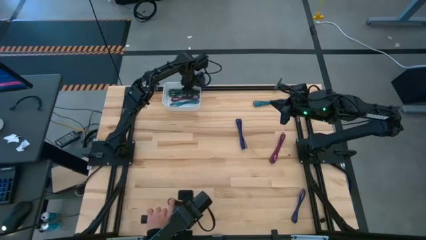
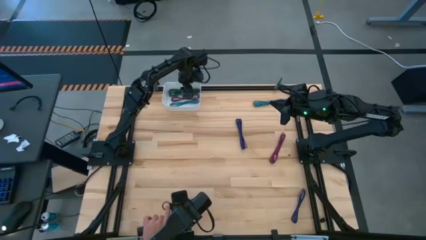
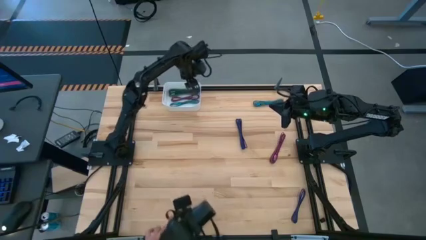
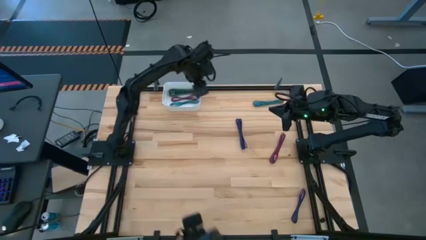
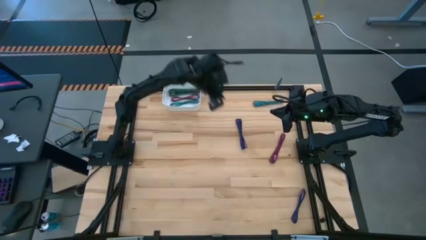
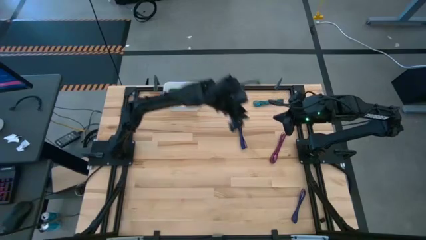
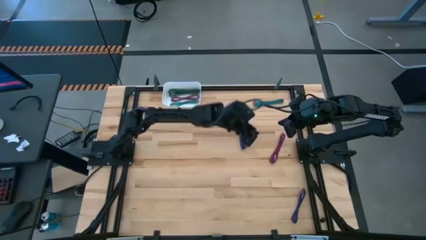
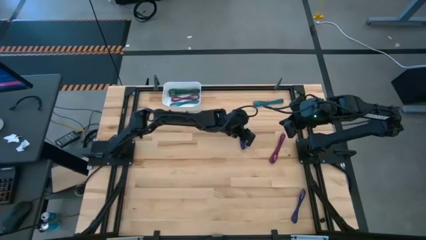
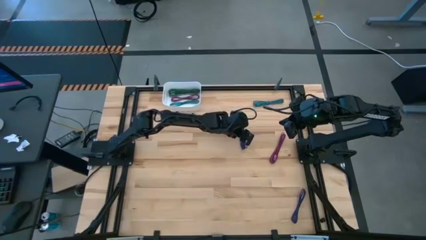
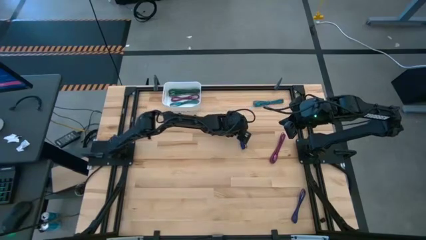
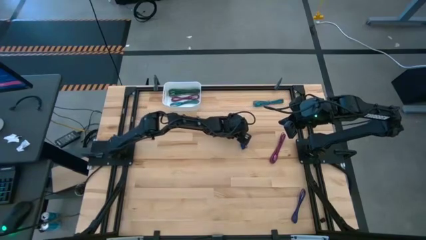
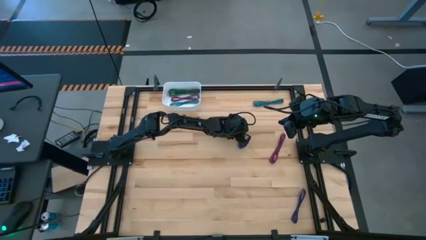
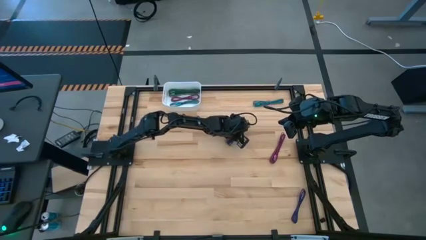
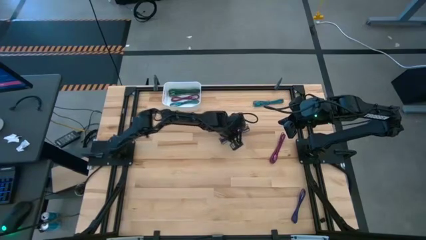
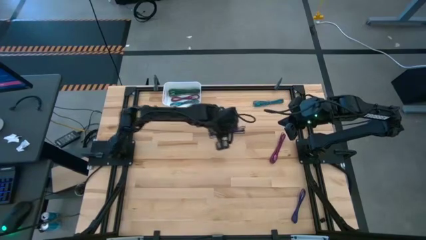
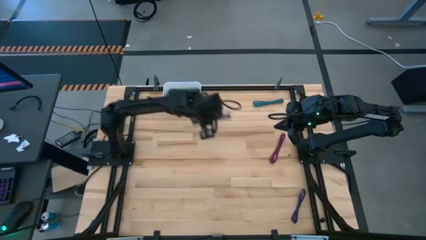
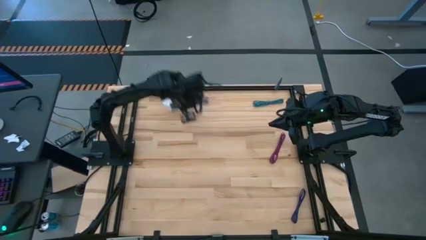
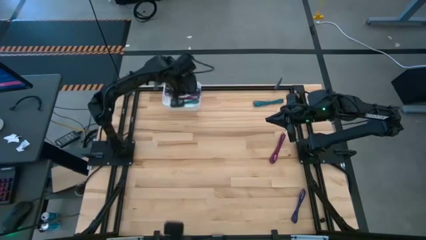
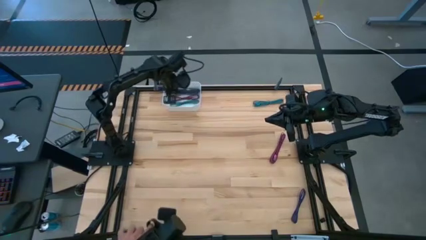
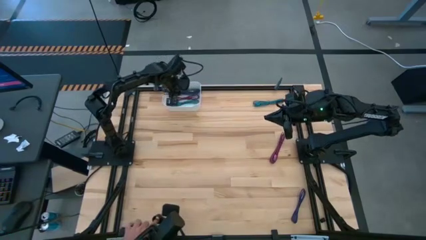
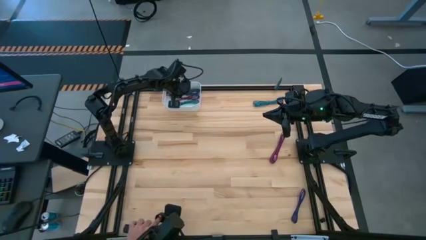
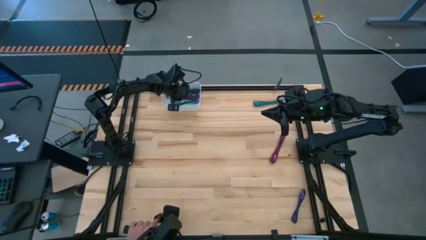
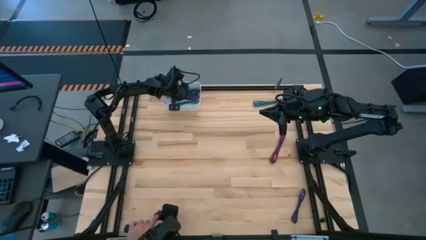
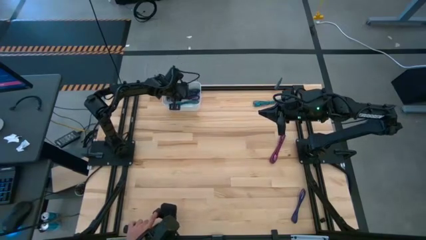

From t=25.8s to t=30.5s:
Task: Pick and place USB-C Cables
Put the top violet charger cable into the white bin

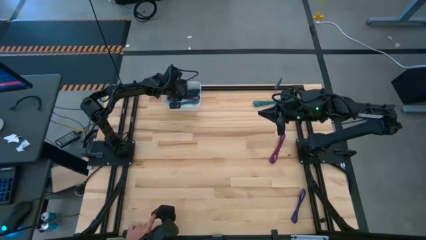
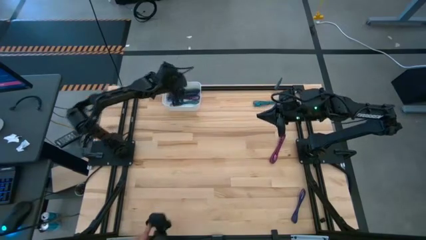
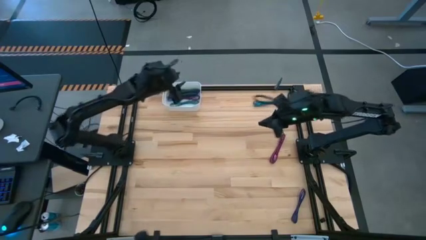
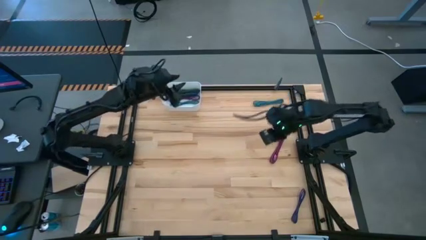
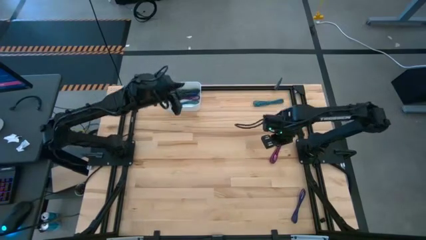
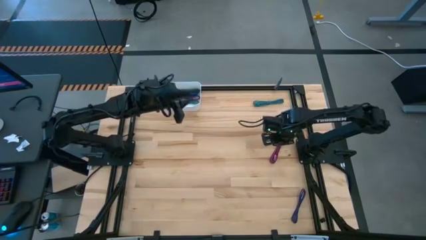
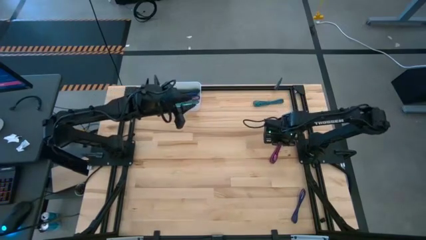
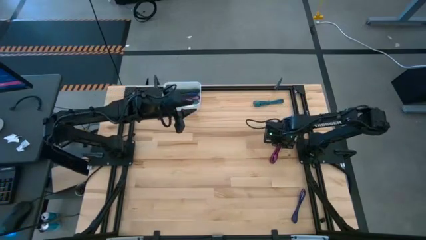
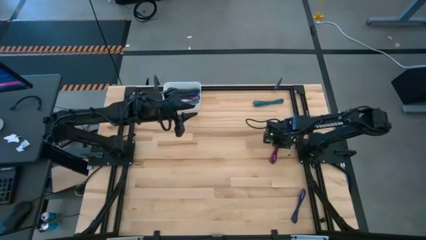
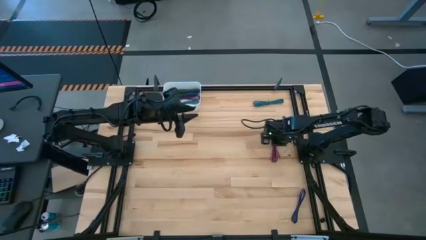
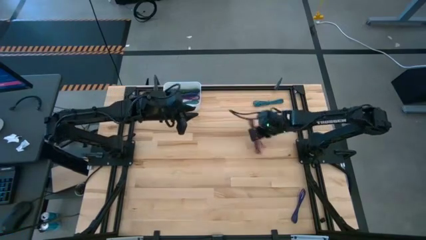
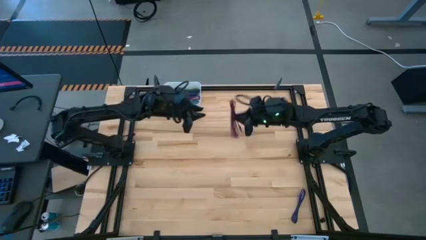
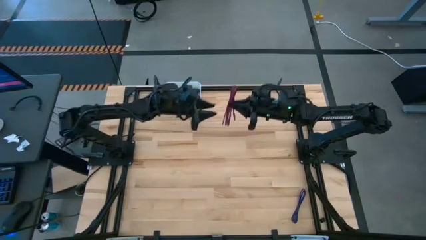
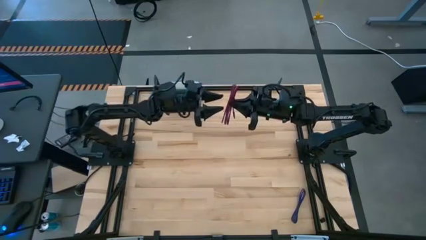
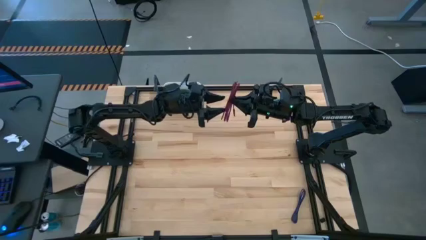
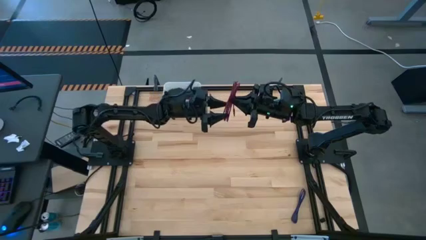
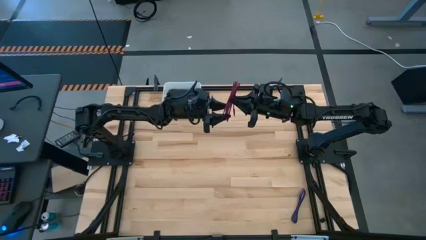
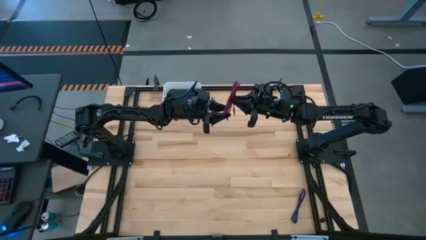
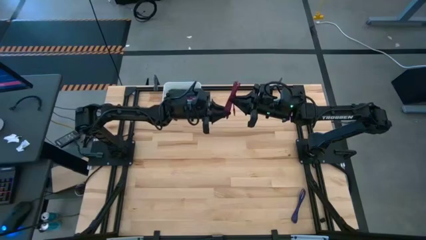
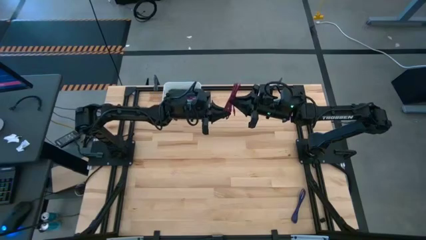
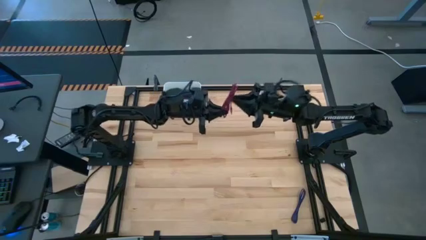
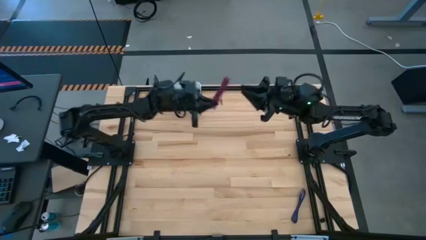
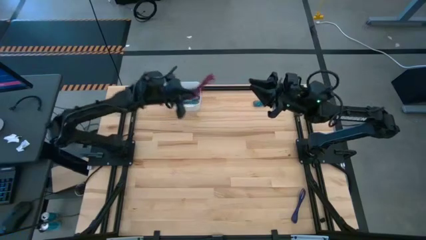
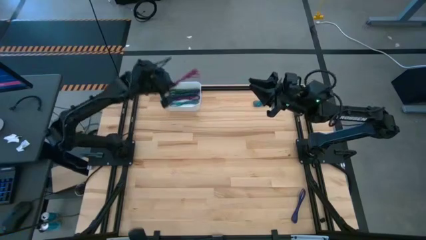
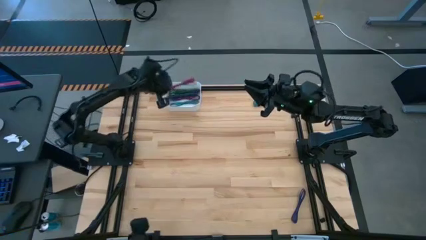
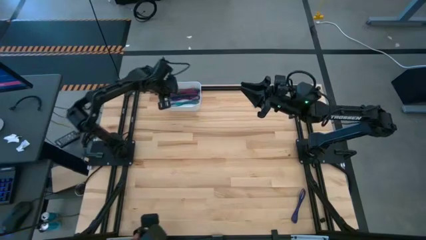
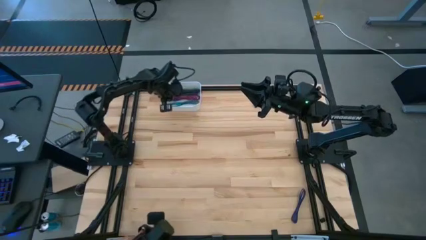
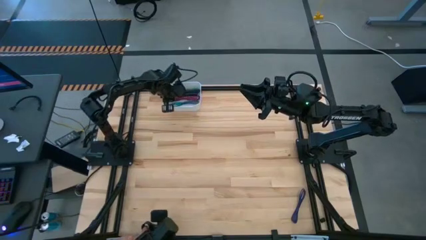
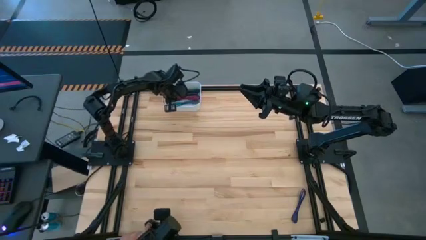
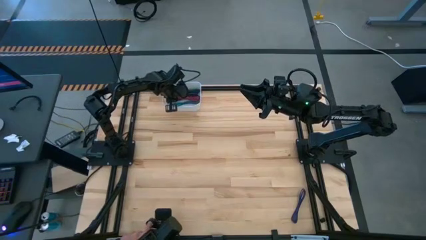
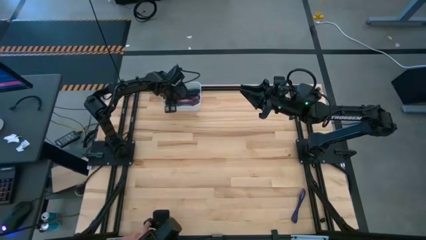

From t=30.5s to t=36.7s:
Put the pink charger cable into the white bin

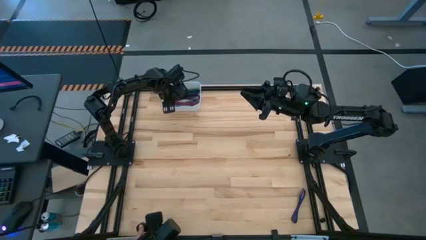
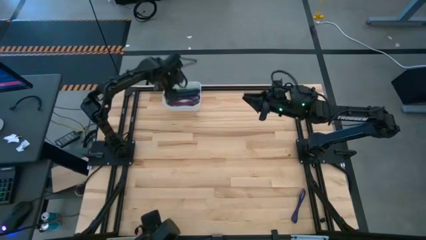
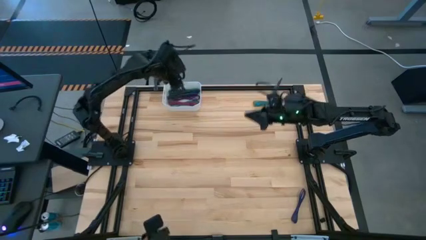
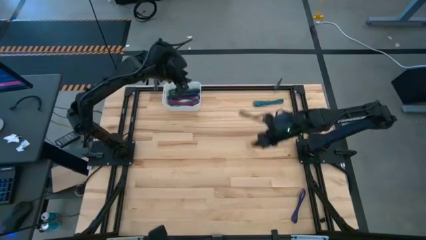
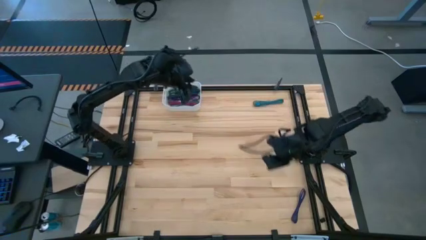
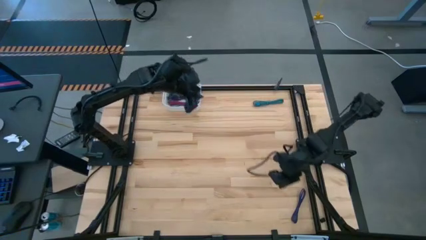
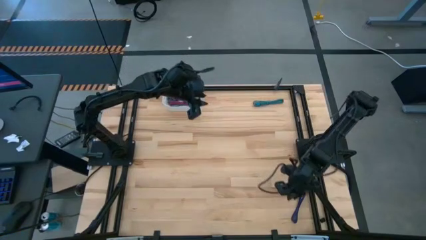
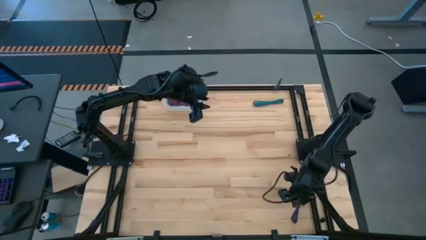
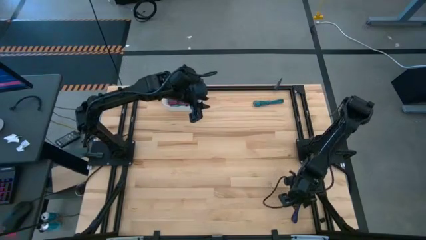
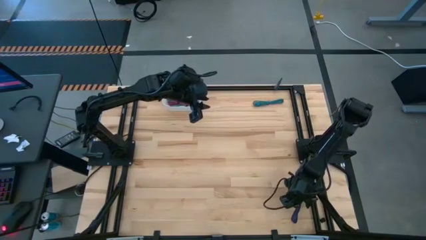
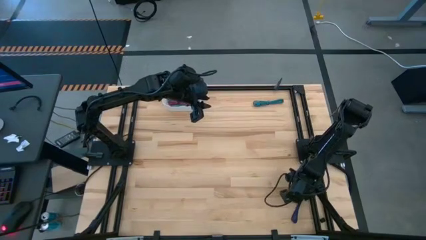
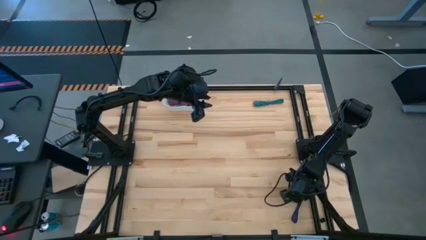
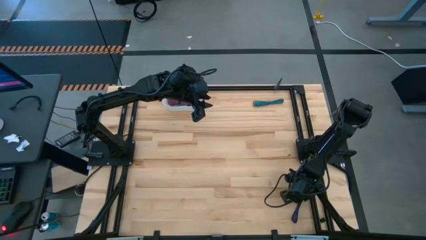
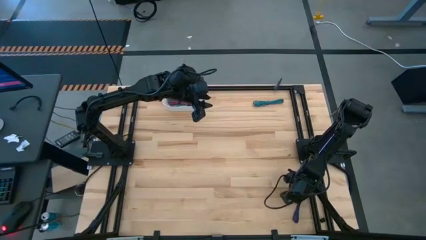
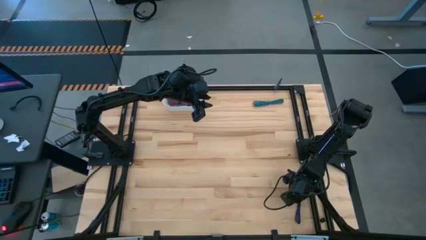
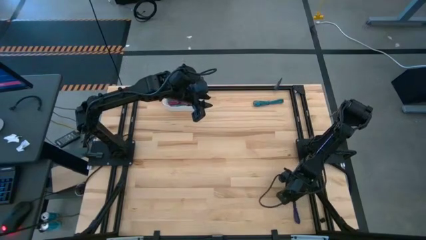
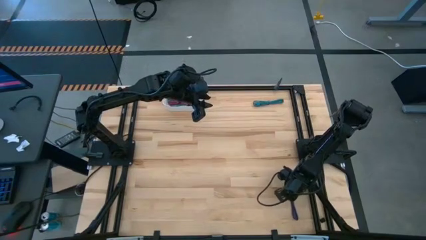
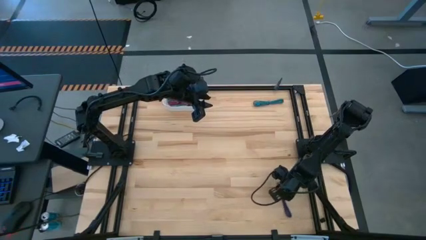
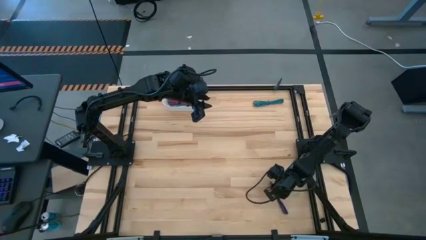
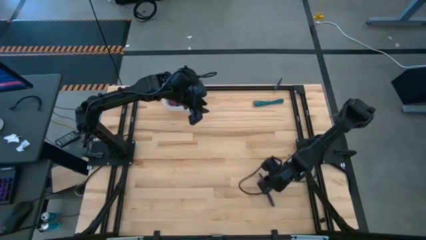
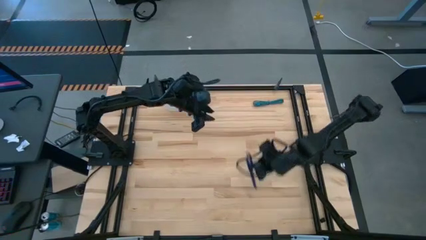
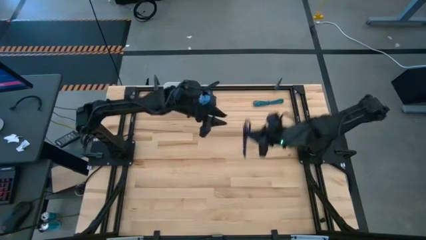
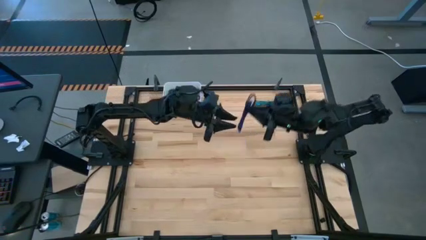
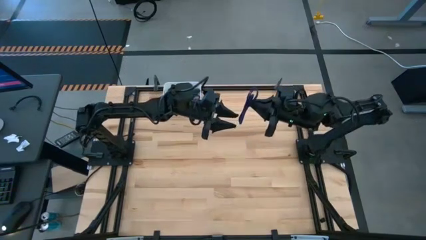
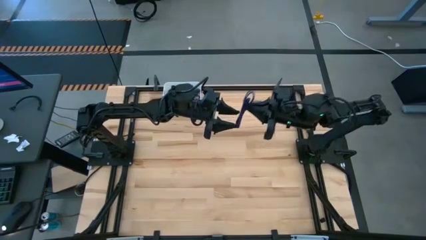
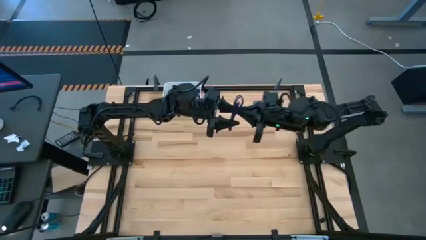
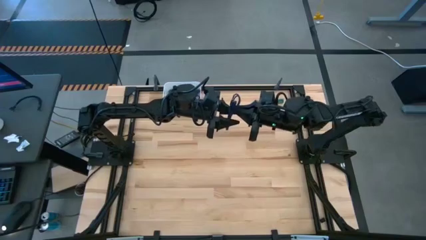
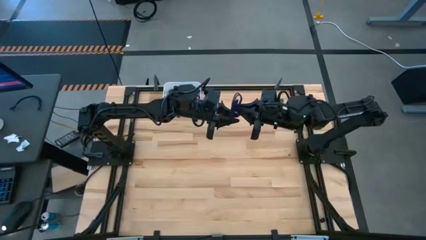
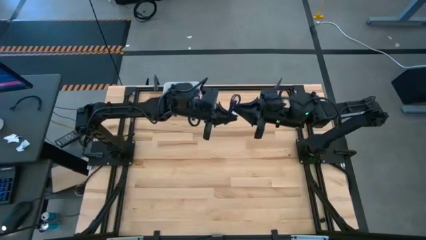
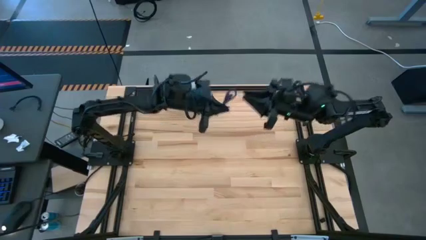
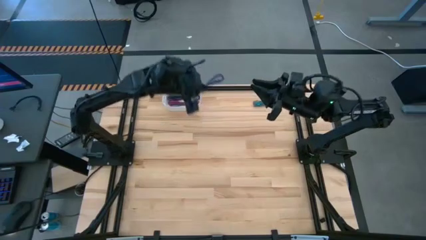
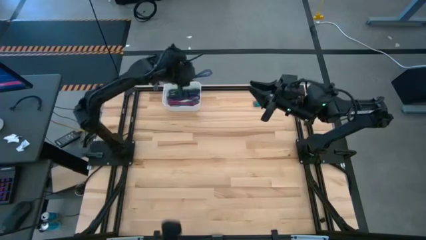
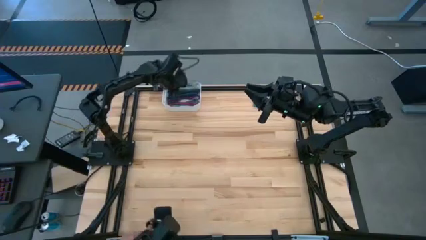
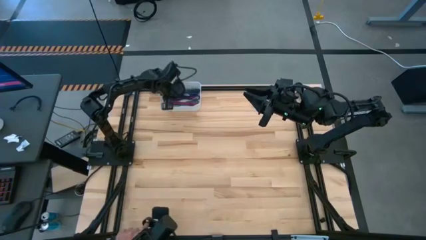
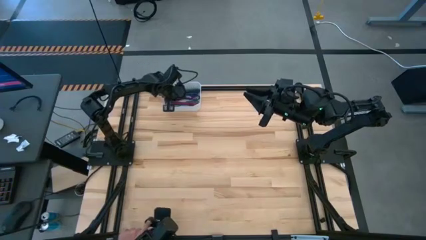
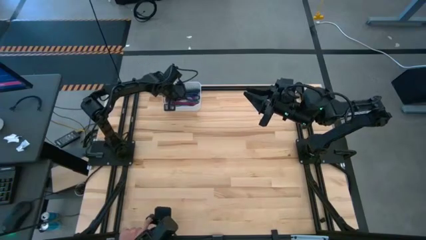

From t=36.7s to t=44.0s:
Put the violet charger cable into the white bin
